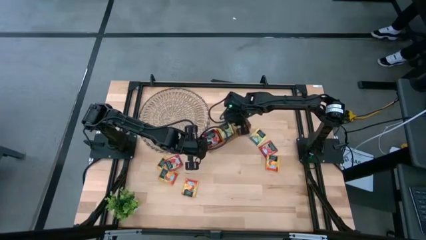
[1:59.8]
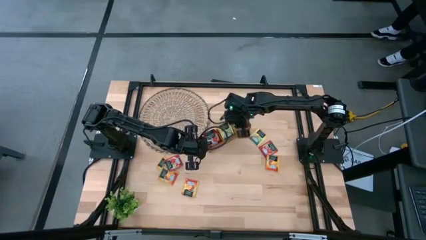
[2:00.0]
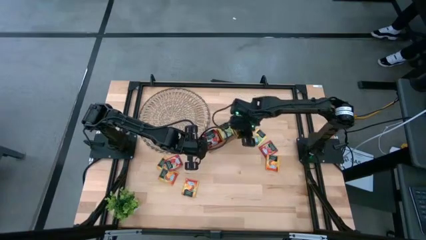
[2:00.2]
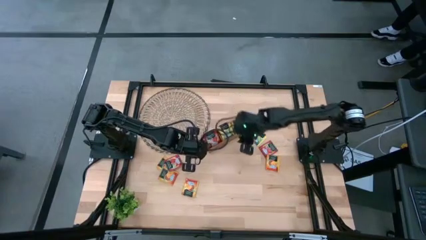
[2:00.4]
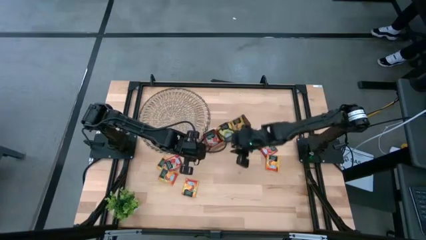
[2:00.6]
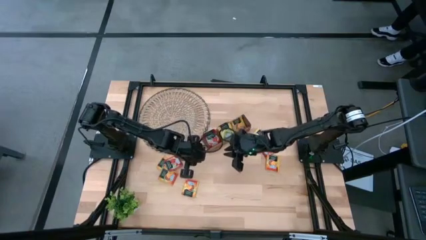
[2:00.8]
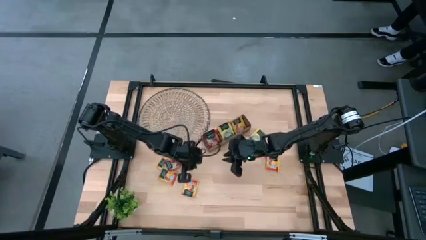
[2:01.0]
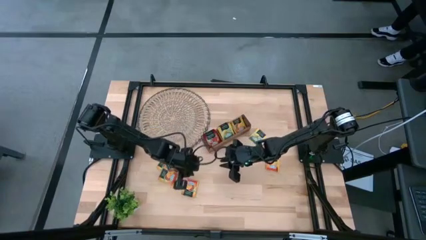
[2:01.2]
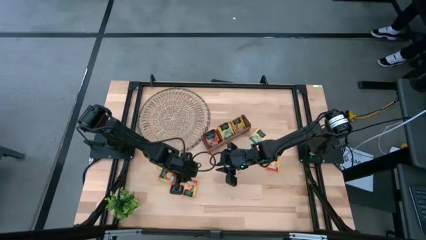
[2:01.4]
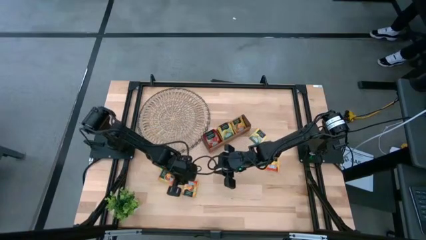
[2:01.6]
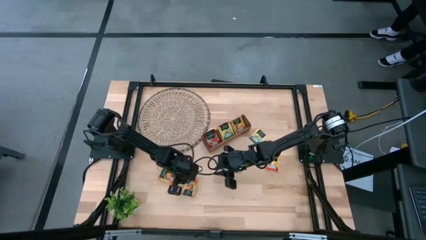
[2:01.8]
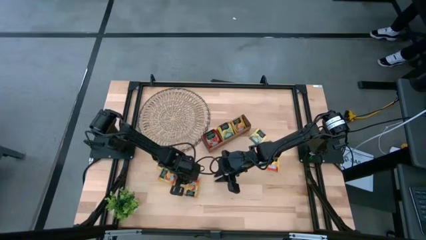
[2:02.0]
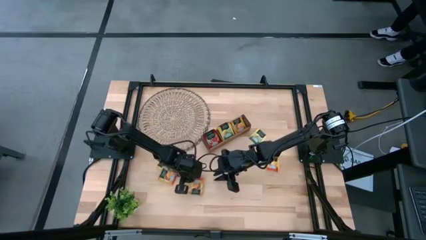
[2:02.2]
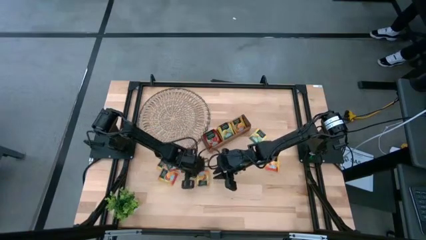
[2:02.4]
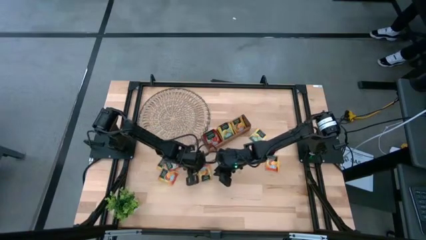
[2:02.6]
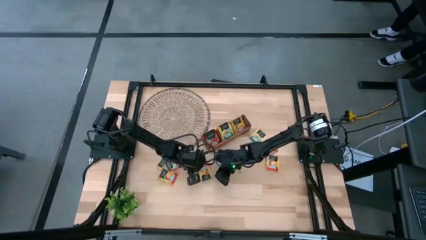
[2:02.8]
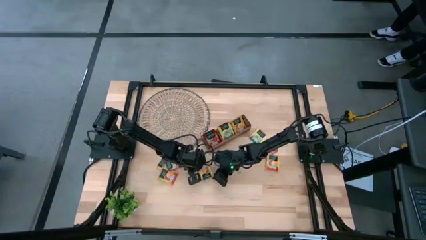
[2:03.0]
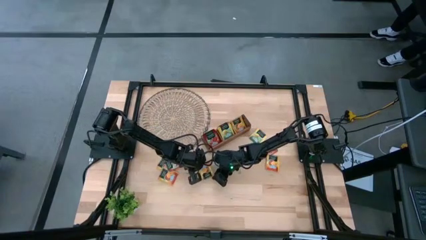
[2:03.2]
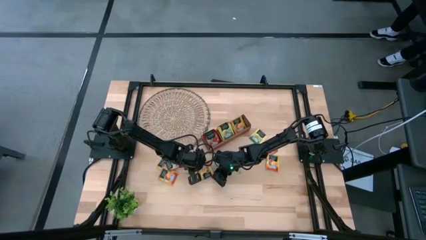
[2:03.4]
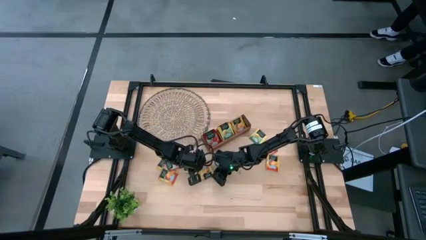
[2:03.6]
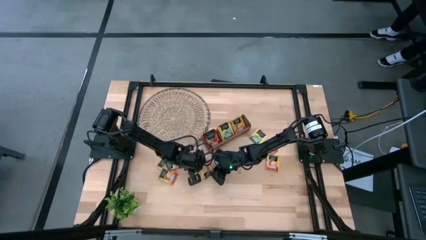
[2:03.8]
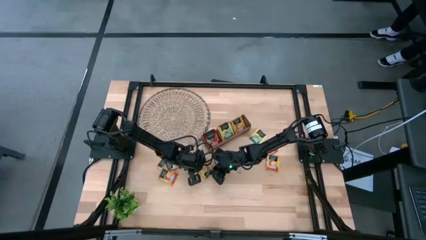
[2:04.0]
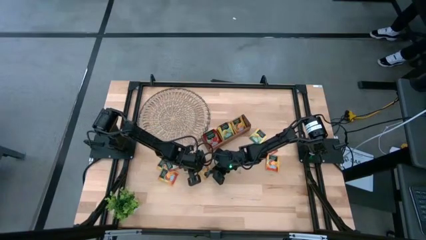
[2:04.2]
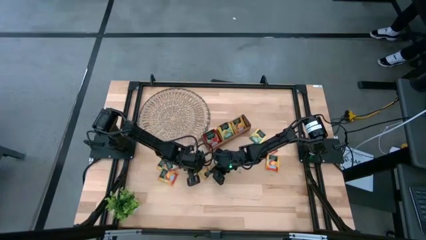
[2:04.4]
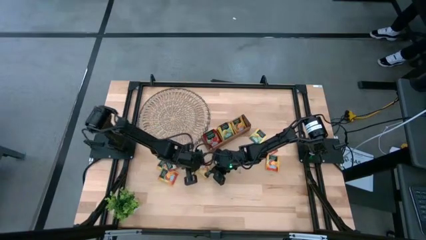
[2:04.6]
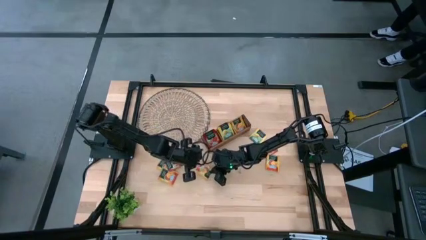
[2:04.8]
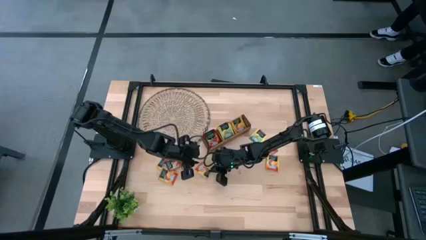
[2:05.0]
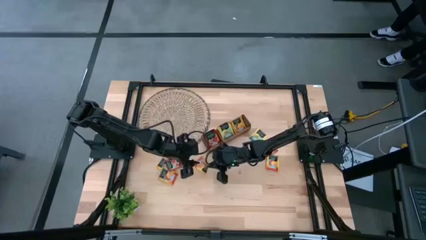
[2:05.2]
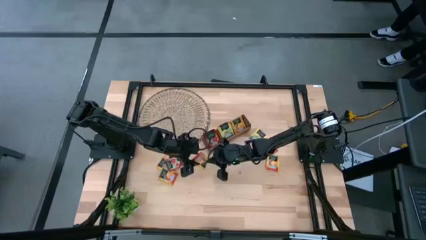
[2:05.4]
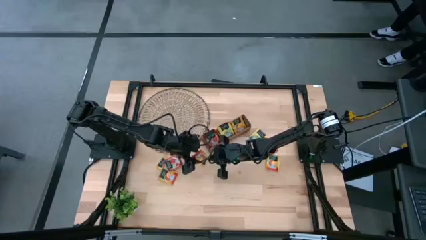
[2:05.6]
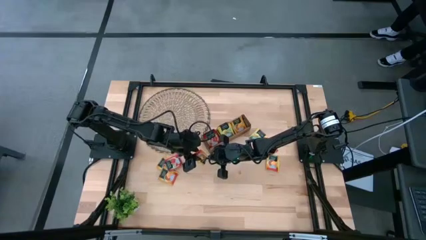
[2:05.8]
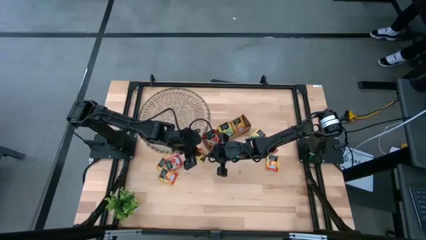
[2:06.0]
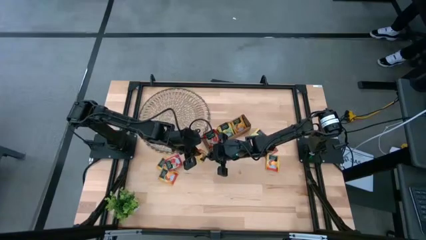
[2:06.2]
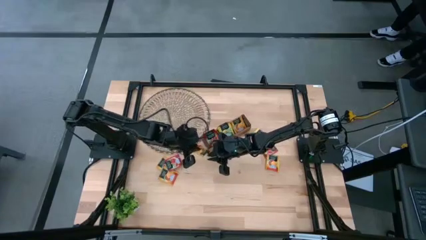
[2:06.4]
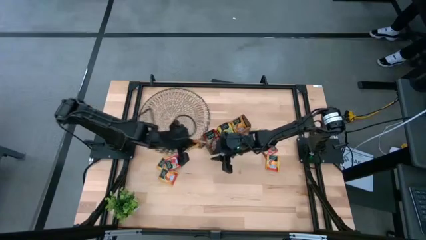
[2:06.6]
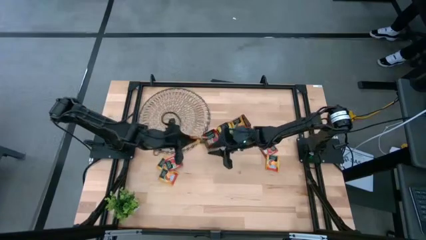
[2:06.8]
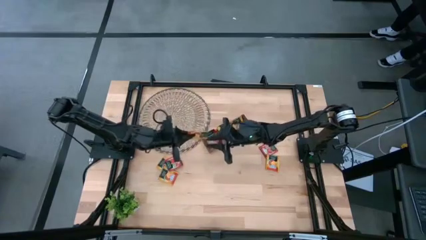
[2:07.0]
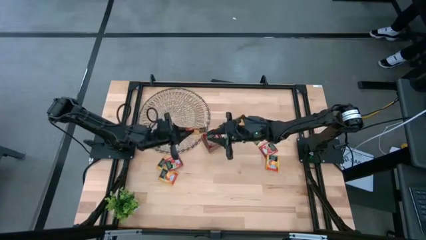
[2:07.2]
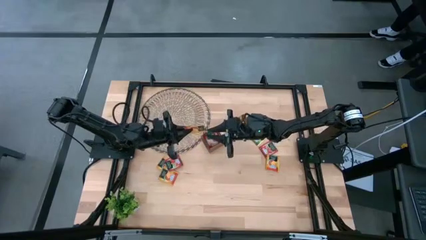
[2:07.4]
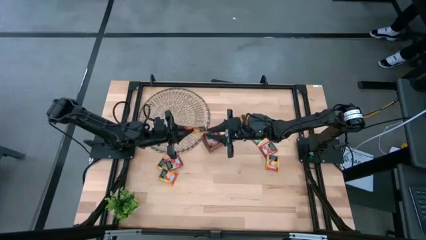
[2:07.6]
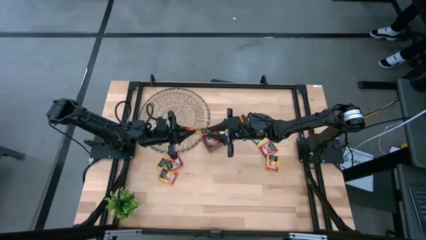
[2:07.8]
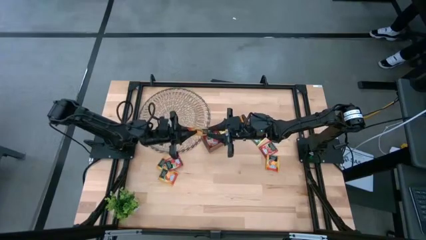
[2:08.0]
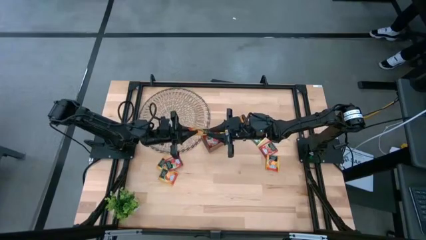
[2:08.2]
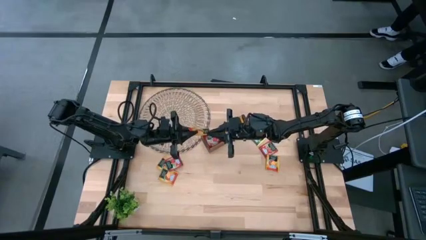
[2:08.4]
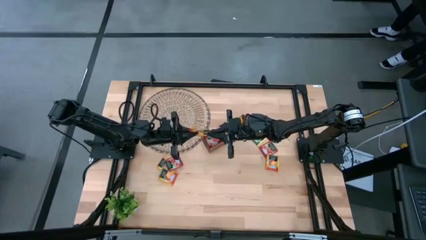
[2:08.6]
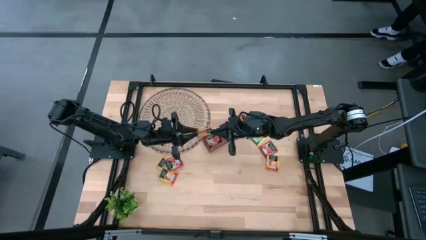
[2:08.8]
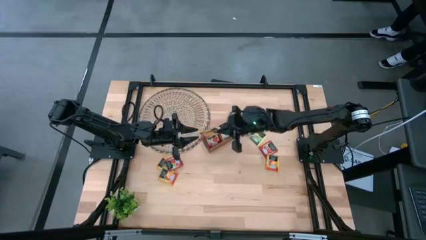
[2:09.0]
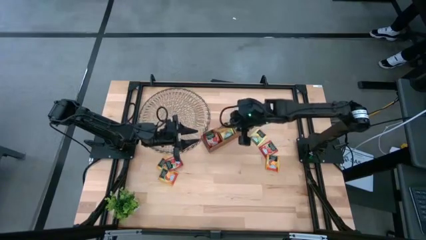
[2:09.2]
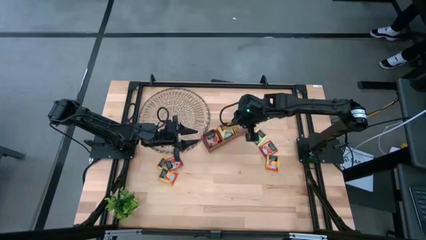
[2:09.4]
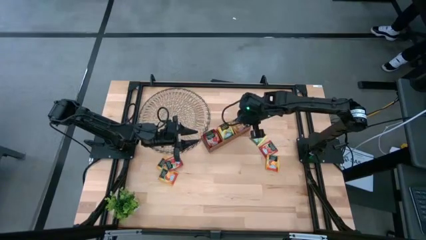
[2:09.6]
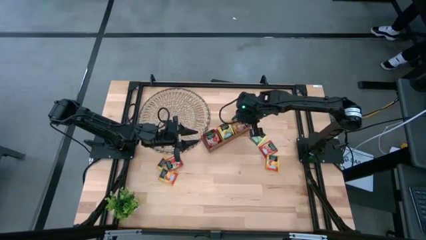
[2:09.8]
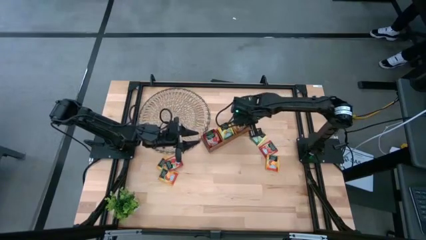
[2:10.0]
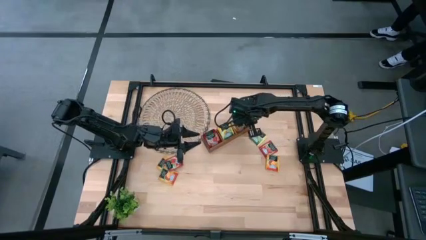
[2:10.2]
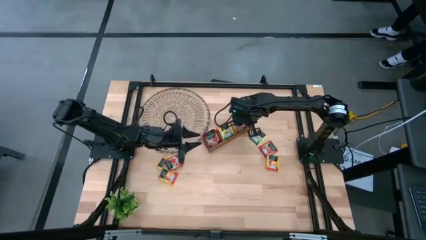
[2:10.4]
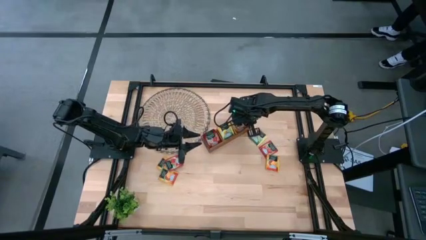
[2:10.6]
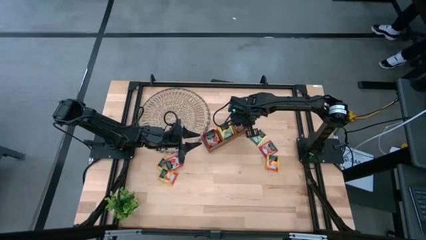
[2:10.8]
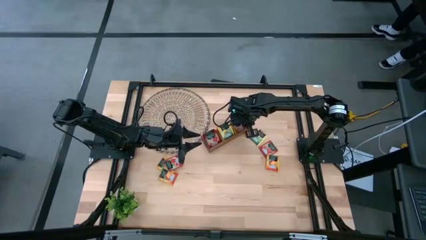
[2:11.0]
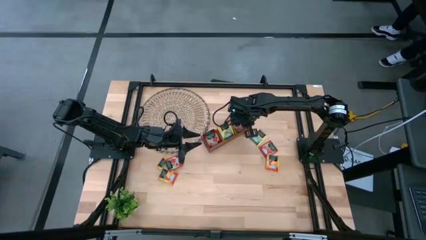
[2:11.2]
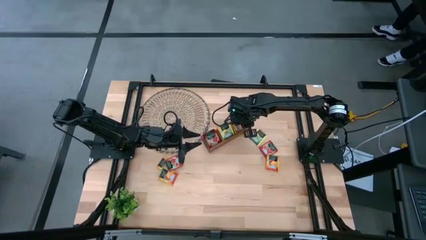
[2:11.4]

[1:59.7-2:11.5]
Task: Pick & Place Tea
Put the orange tea bag into the right section of the wooden organizer

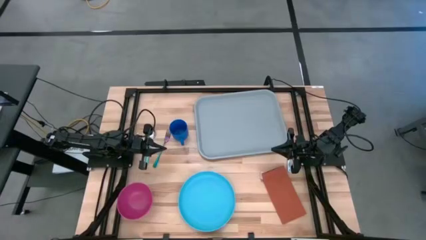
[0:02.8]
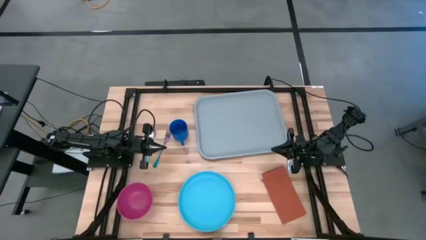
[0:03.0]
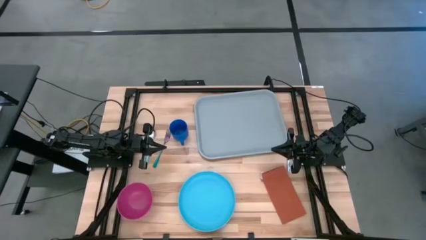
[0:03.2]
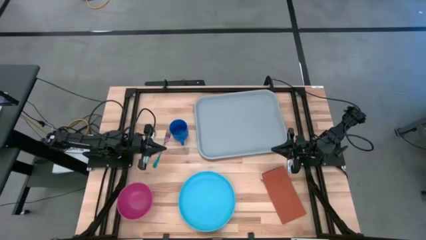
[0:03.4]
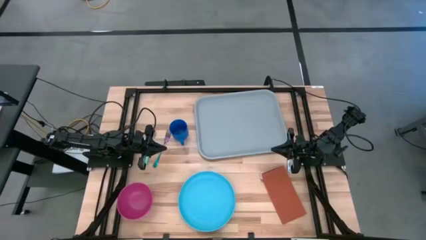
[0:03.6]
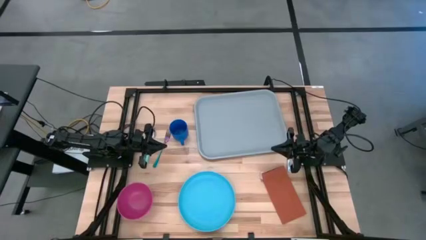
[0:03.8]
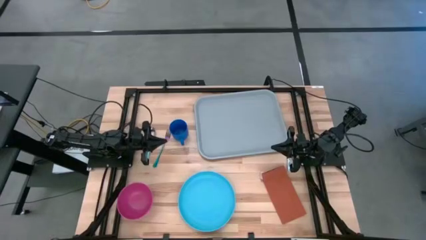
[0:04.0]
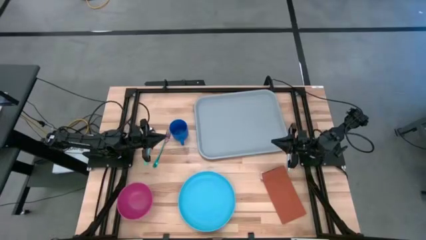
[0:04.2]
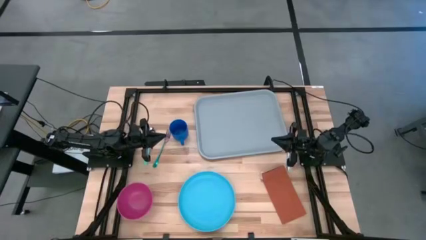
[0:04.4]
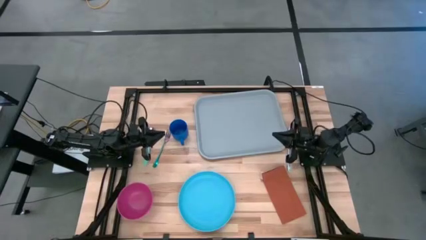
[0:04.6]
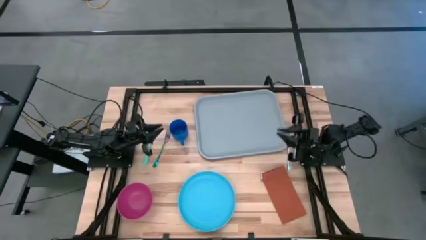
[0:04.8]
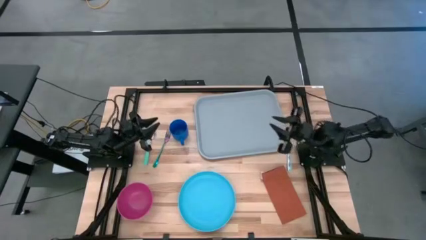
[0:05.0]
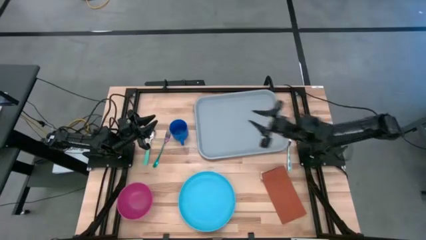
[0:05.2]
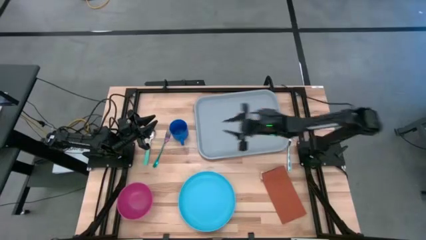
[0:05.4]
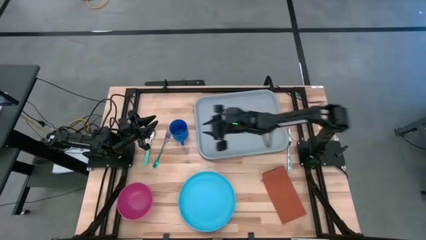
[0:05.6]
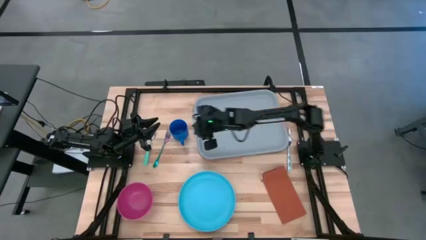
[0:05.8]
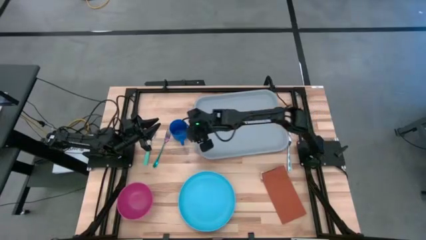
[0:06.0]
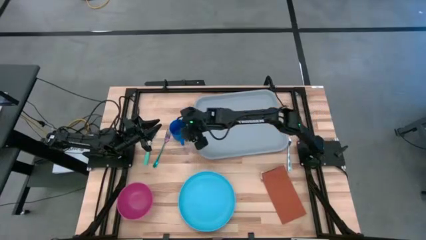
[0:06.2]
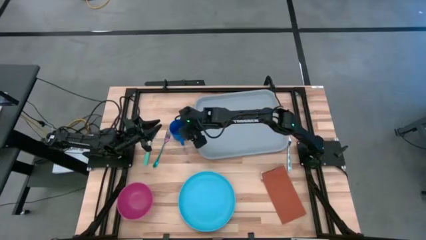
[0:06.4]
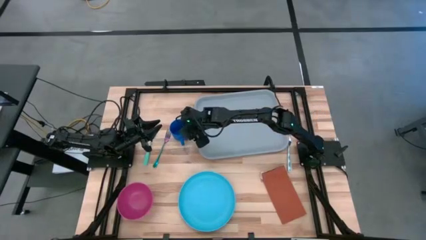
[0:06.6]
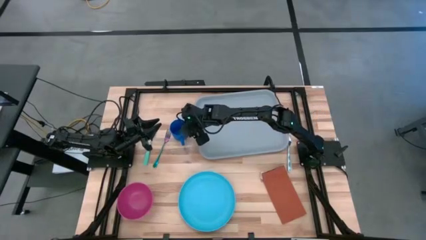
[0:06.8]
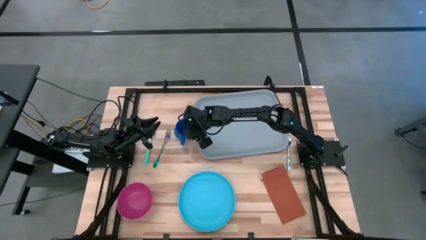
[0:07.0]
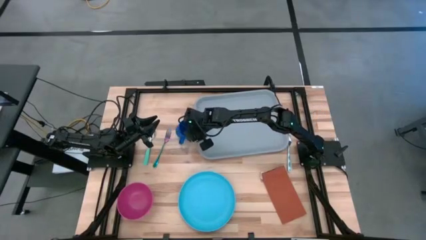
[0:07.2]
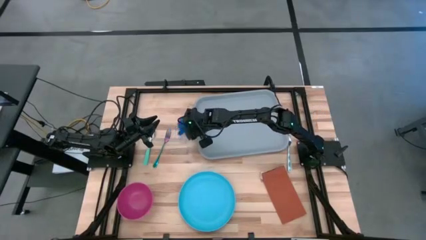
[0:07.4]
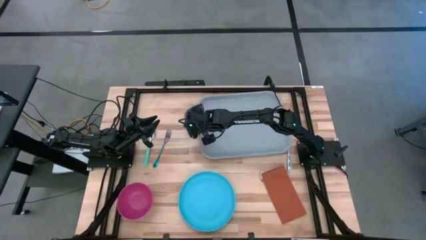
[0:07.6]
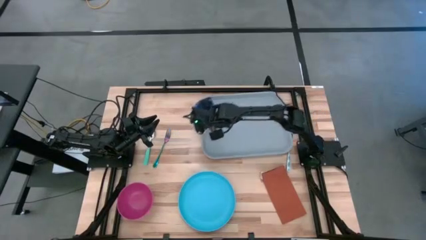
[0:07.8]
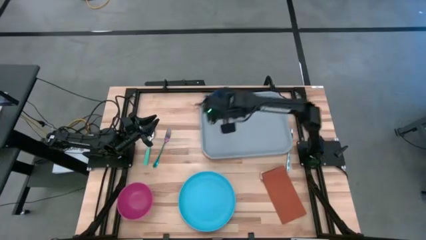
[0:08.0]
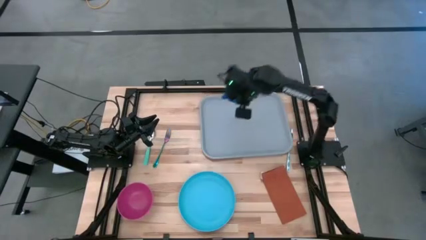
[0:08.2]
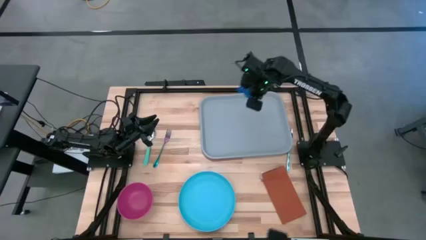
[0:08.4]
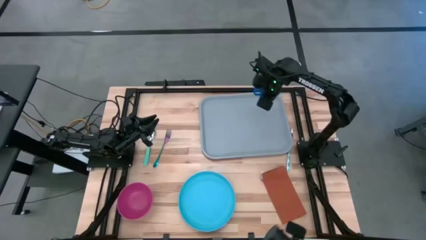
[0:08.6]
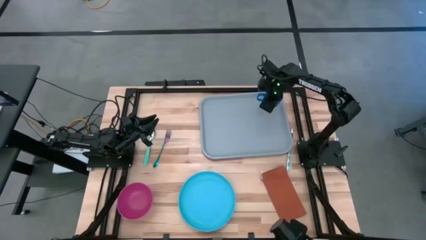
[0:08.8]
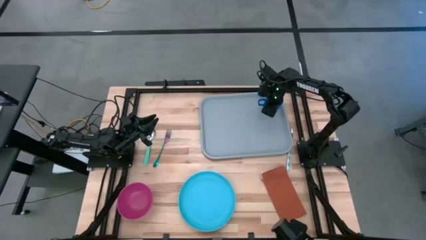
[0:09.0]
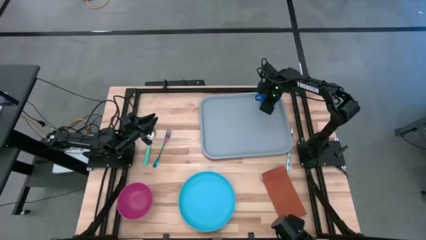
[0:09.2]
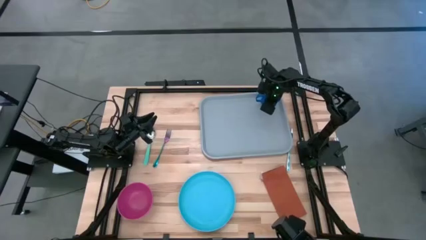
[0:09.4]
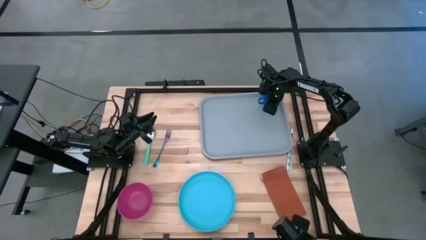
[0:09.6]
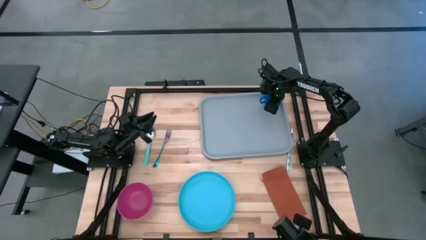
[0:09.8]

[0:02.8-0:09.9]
Task: Set up tray
Put the blue mug on the gray serving tray
